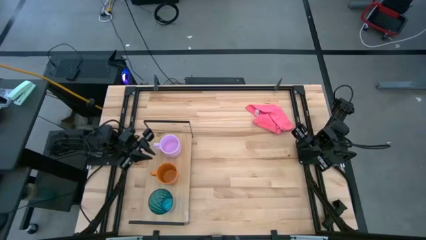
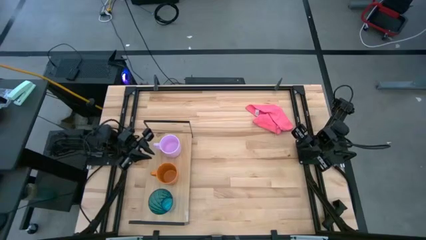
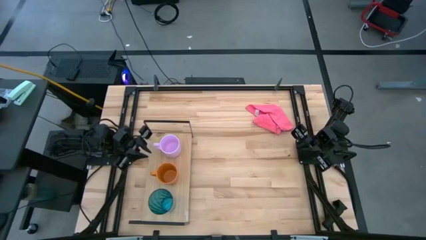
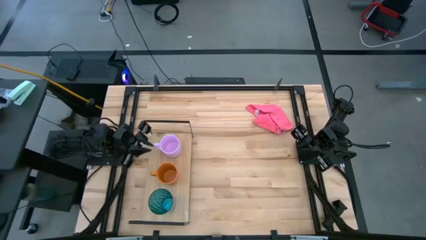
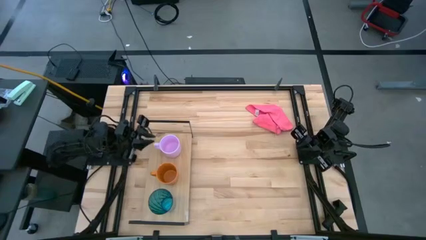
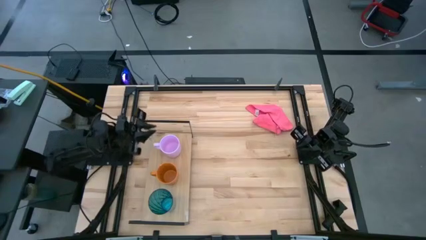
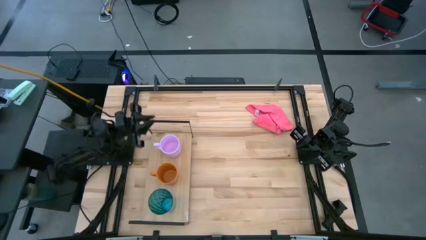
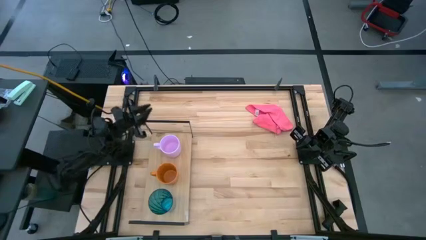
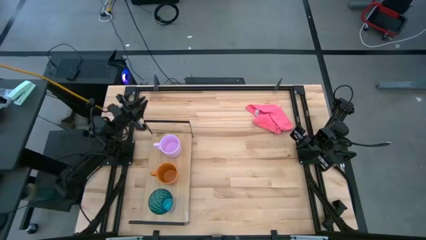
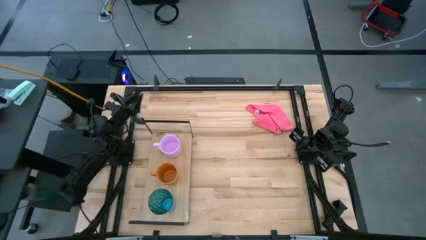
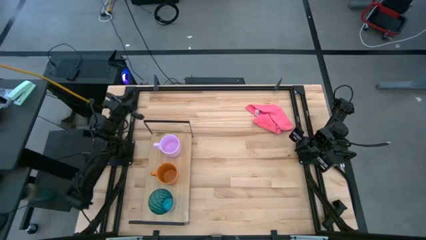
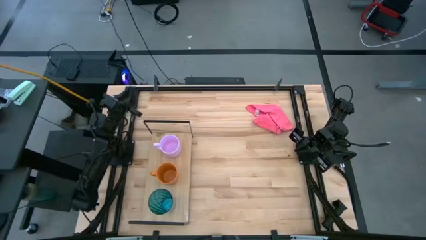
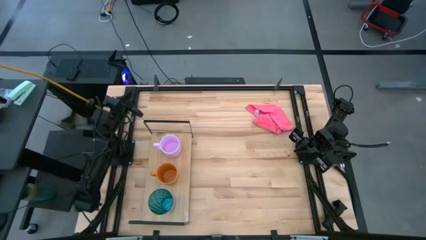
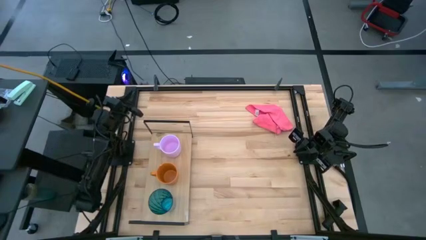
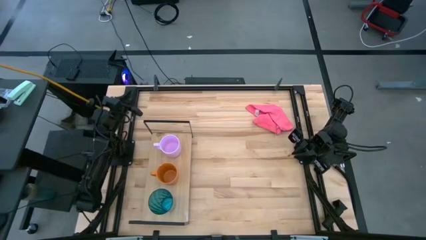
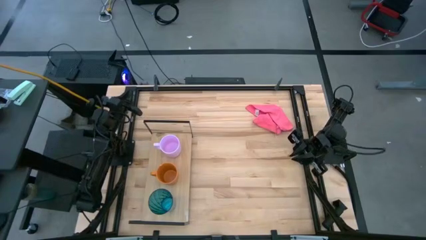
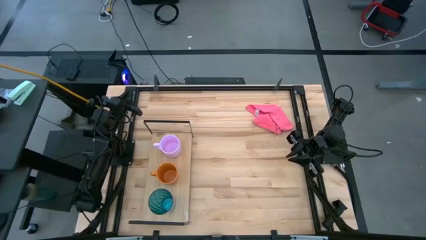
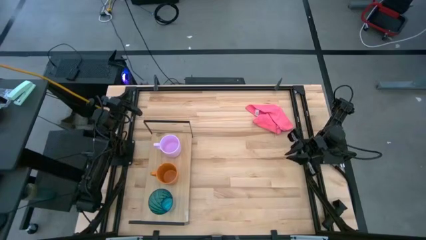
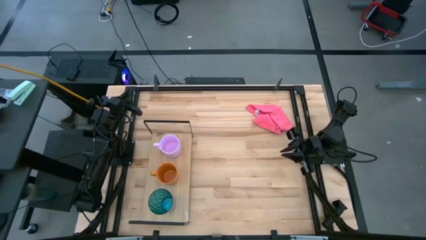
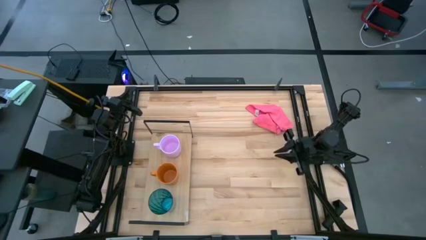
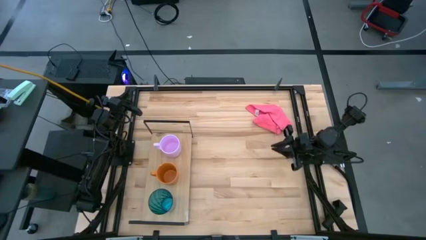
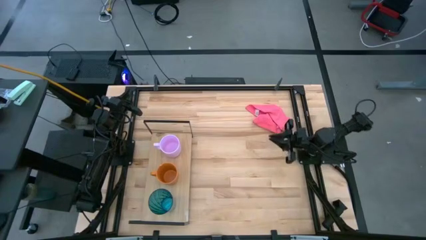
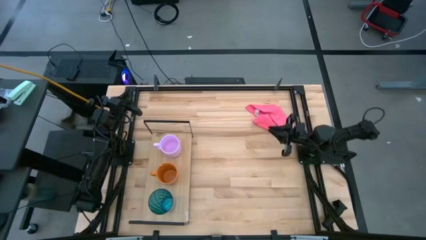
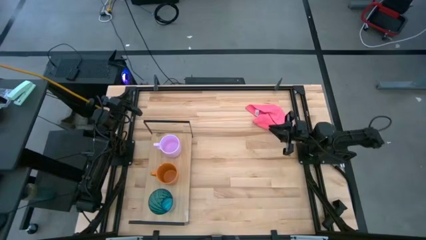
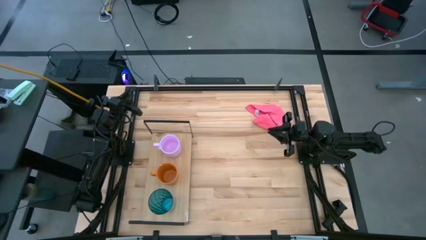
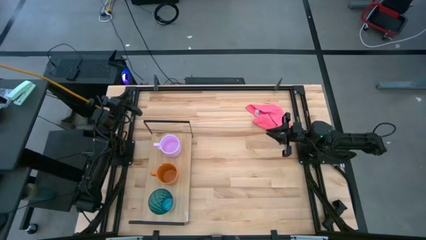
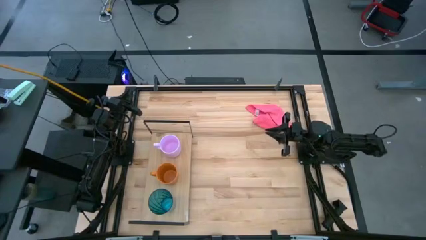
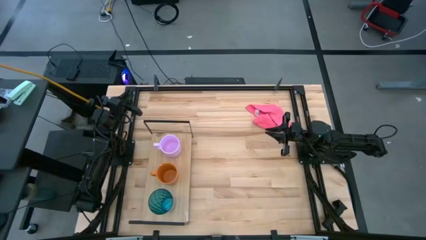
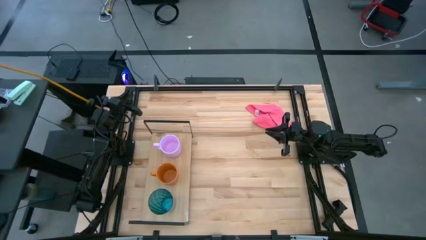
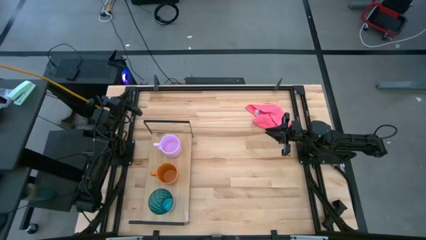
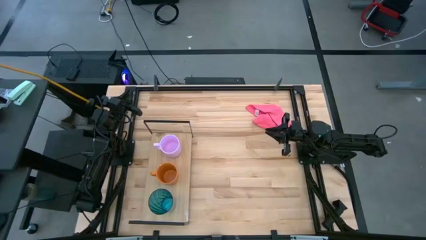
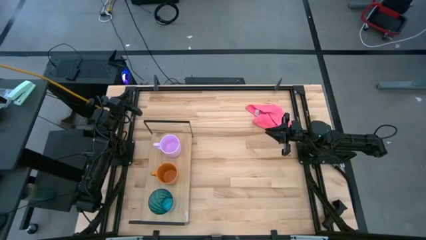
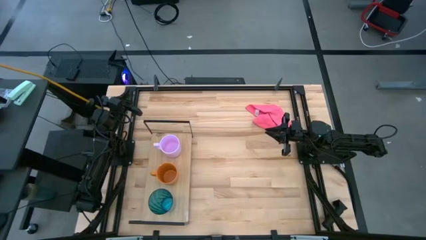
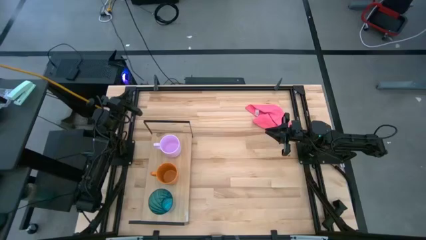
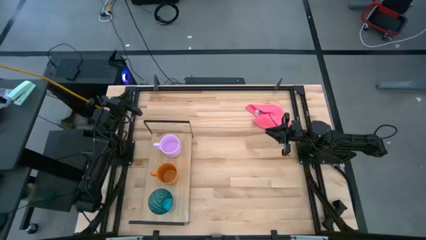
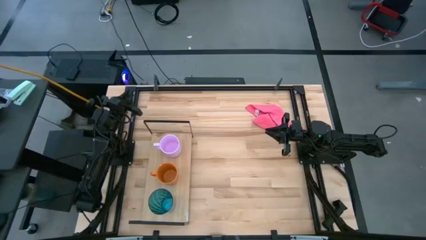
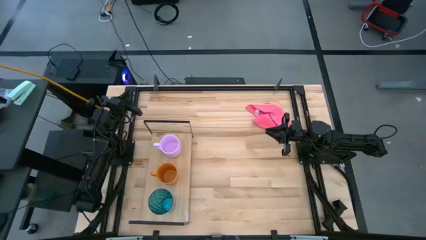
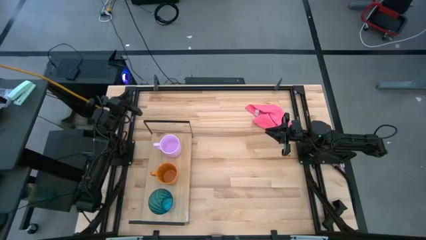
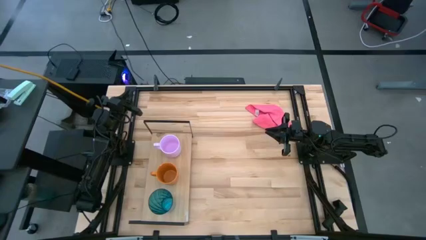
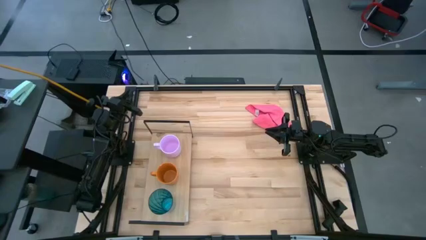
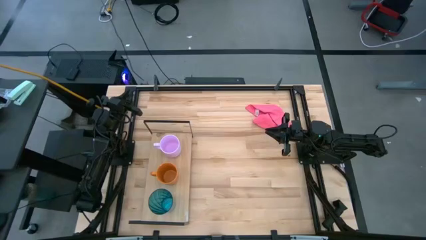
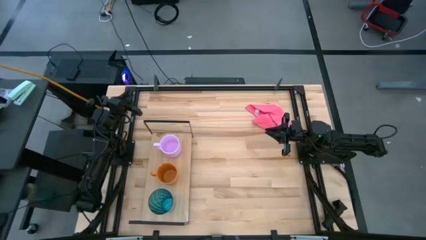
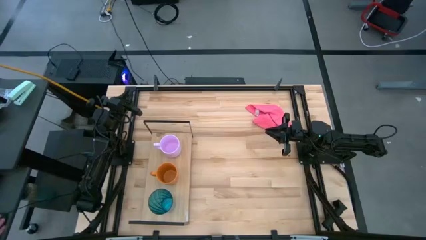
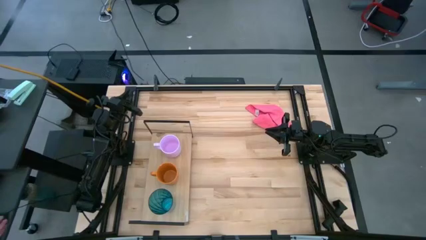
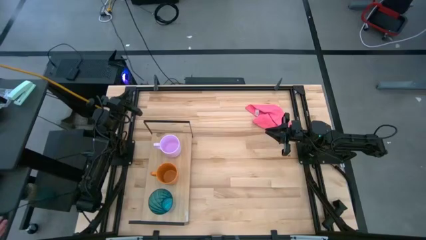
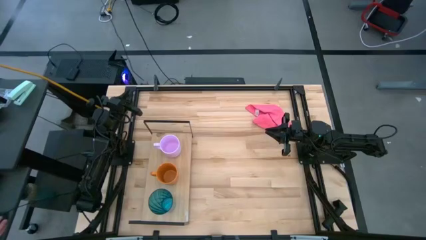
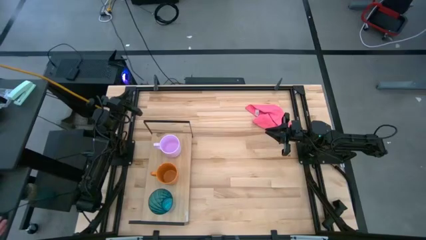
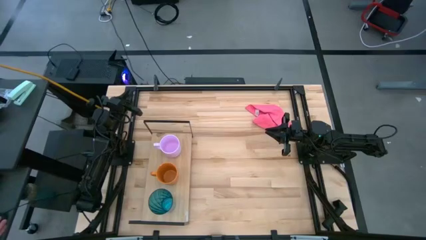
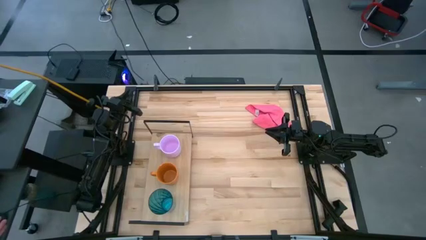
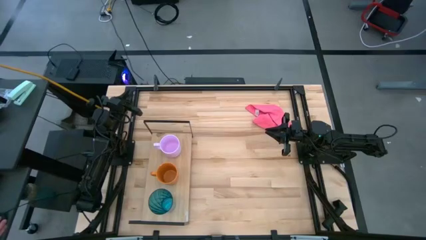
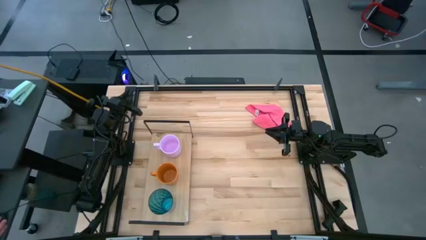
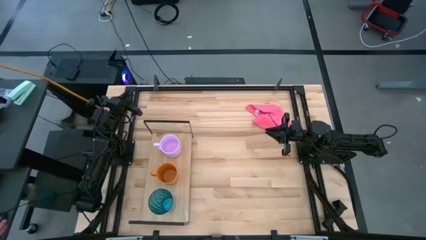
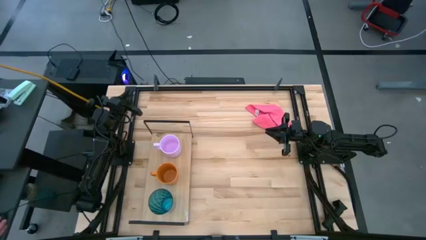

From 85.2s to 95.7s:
Task: Stack small to large cups/mugs on shelf
Return to home position
